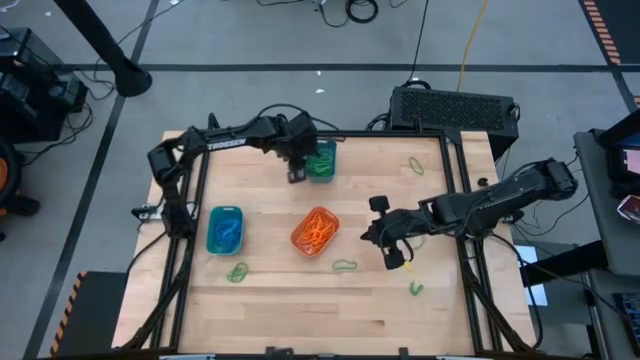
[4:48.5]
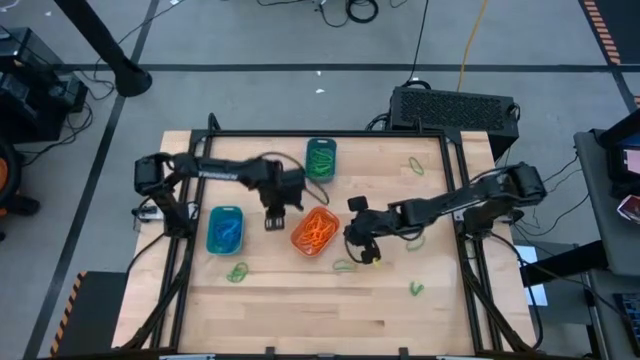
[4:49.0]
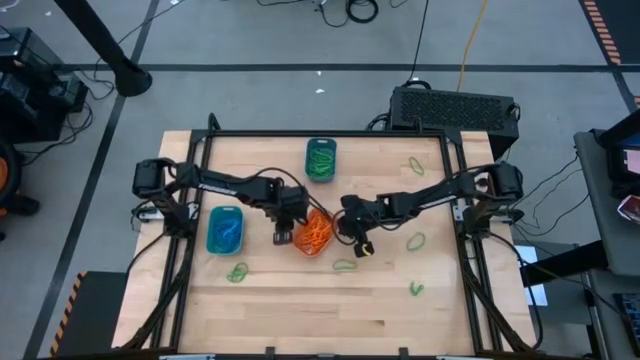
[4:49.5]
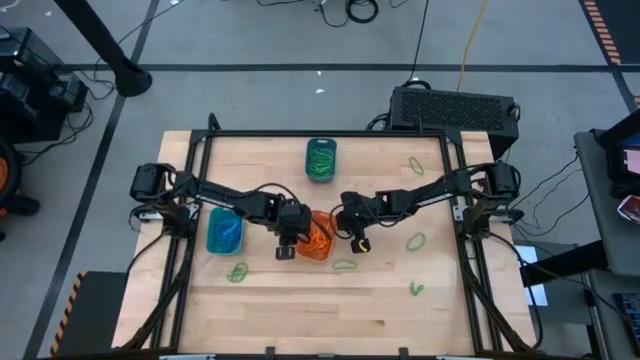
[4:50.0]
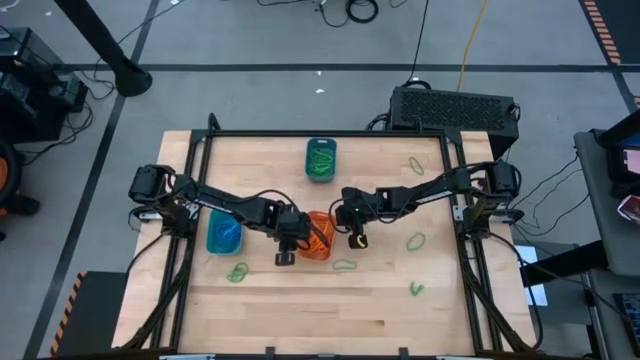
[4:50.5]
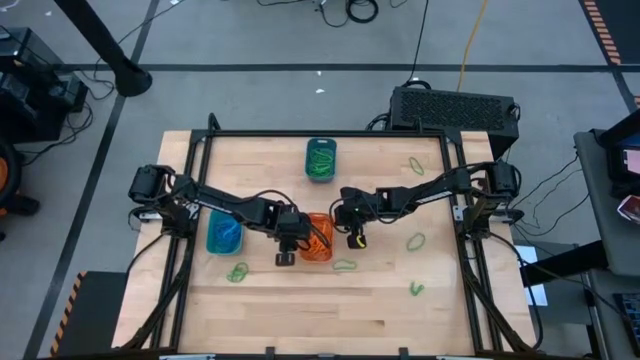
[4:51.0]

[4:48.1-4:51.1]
Task: Sort rubber bands into baskets
Adjust the orange bin on the table

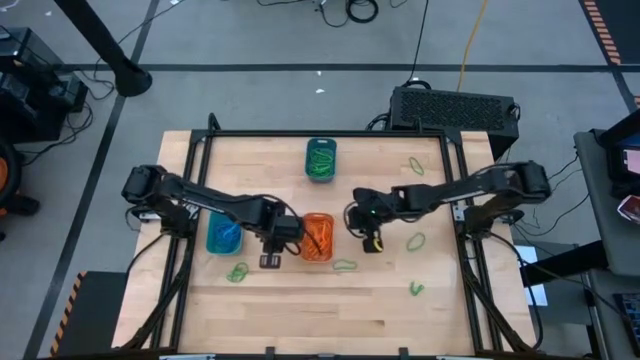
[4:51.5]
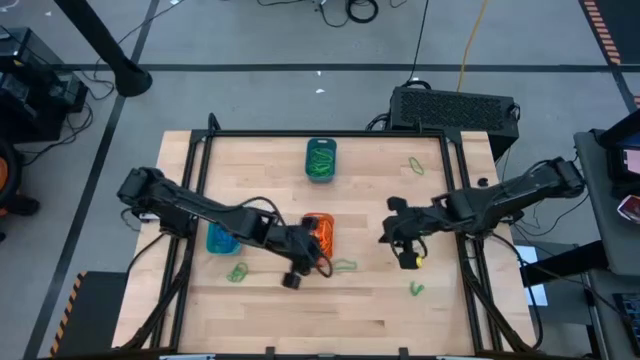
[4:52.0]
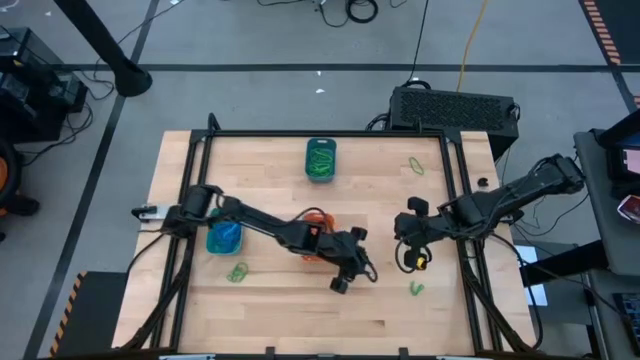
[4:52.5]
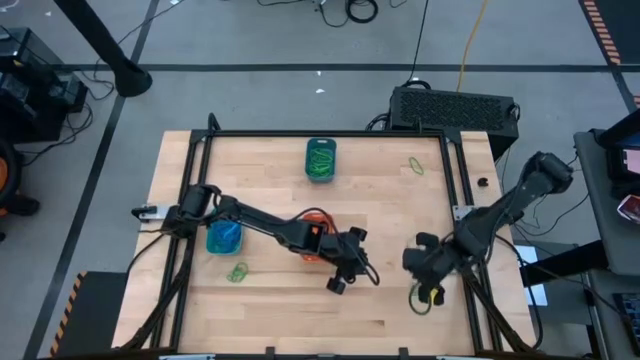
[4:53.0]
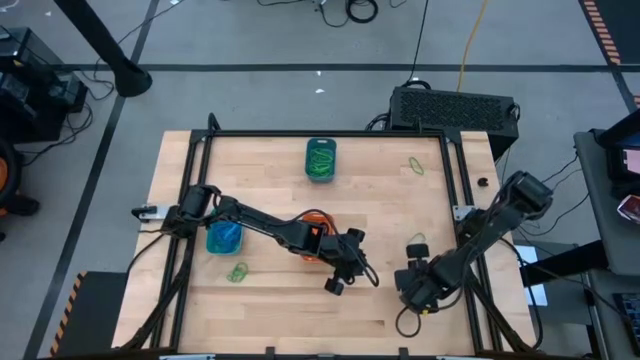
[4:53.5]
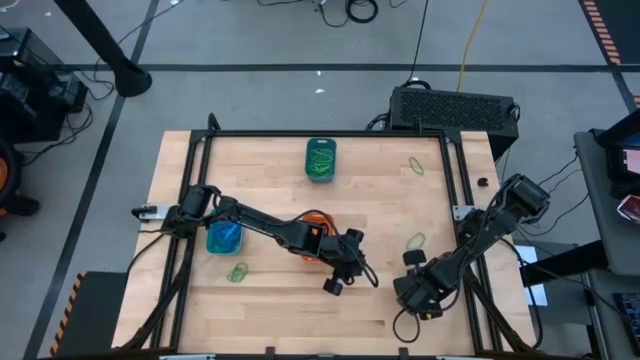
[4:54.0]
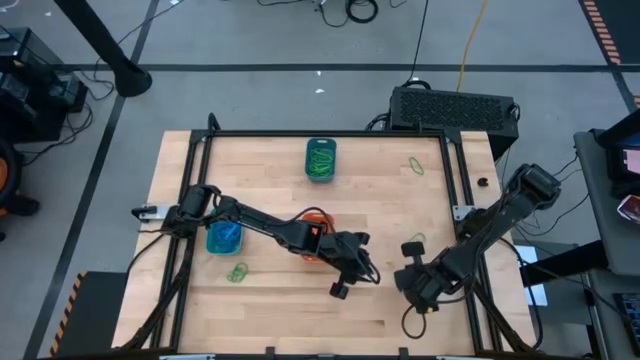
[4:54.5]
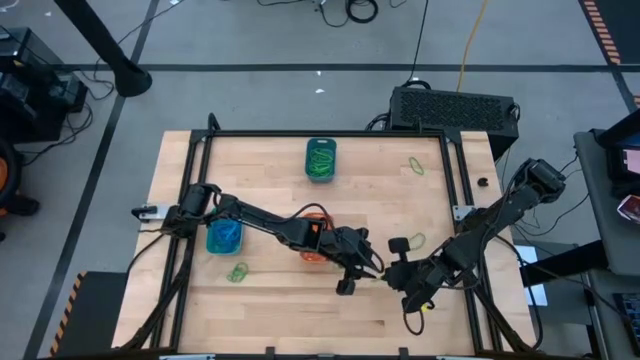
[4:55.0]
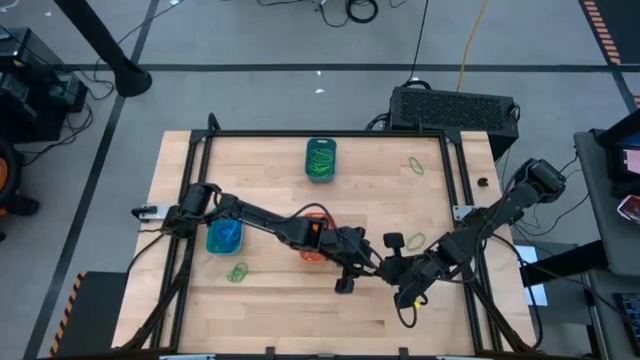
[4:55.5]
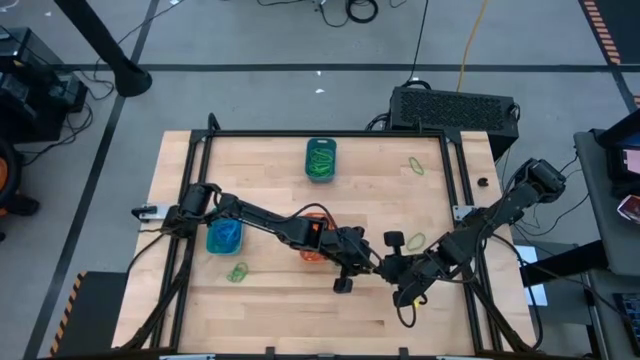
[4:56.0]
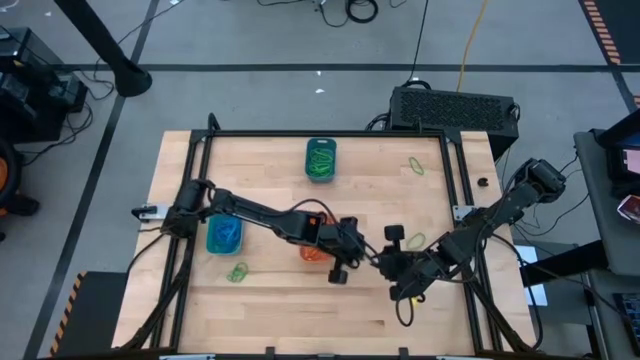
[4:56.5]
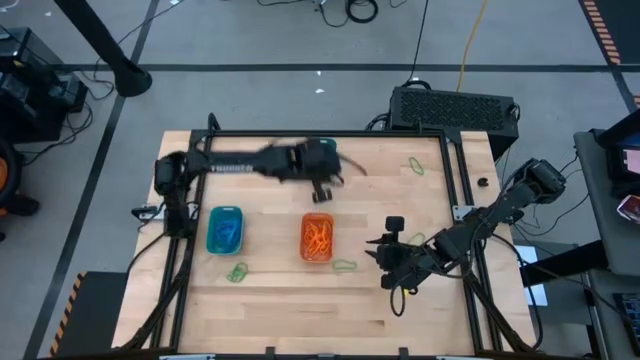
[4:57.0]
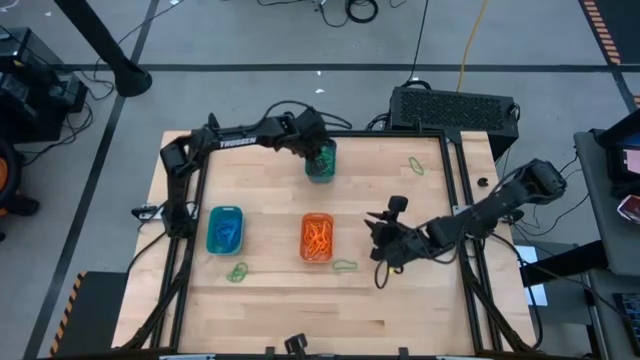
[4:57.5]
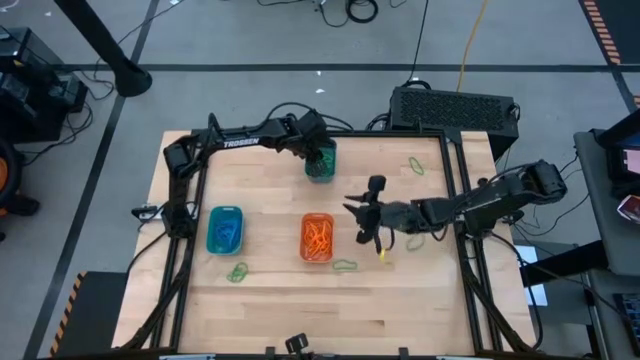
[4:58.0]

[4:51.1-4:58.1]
Put the green rubber band into the blue bin

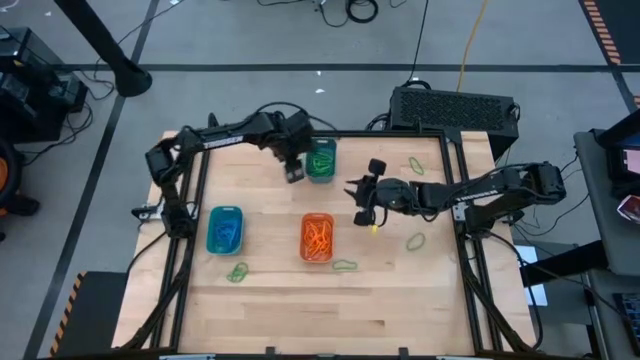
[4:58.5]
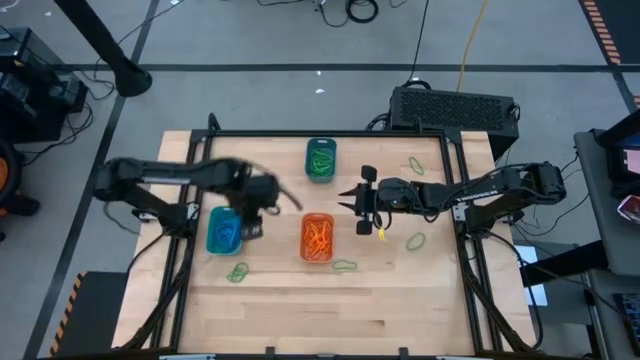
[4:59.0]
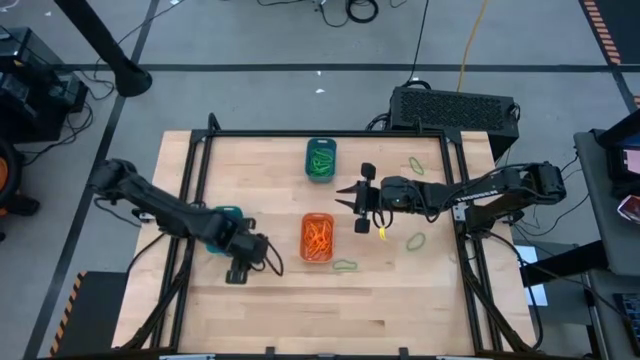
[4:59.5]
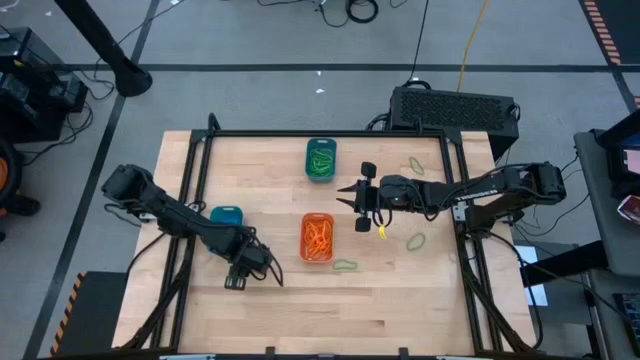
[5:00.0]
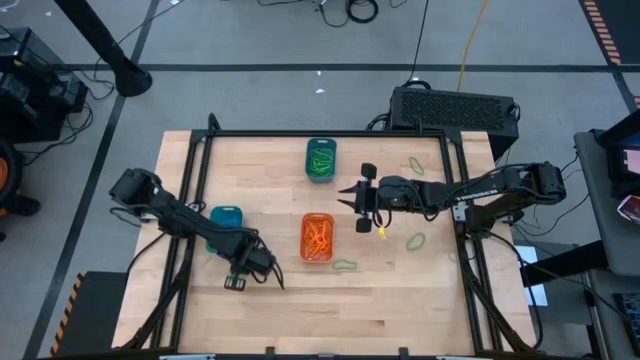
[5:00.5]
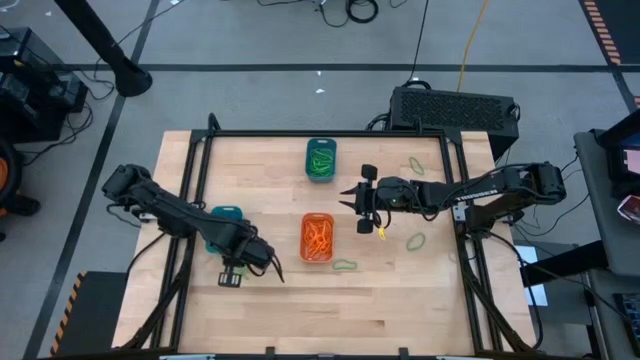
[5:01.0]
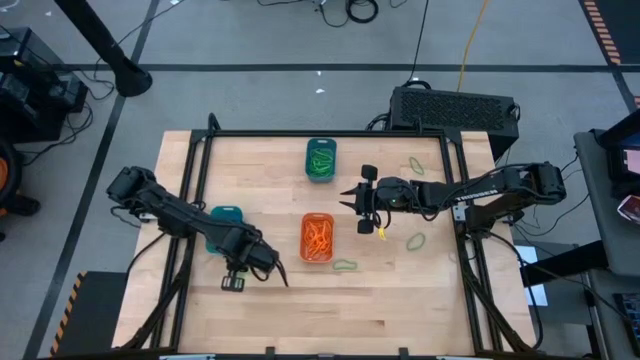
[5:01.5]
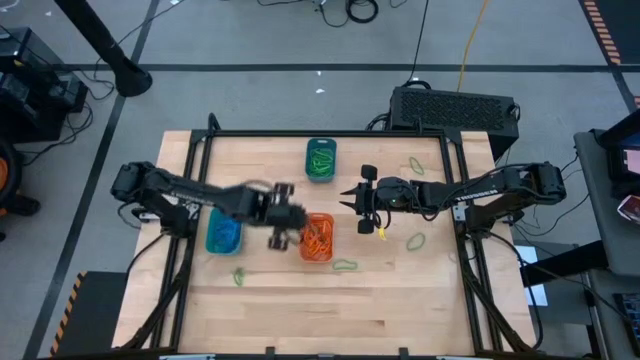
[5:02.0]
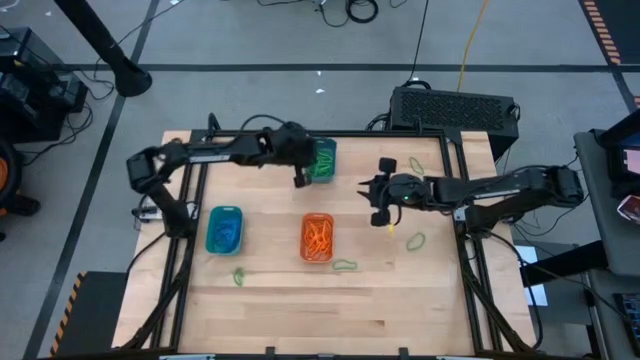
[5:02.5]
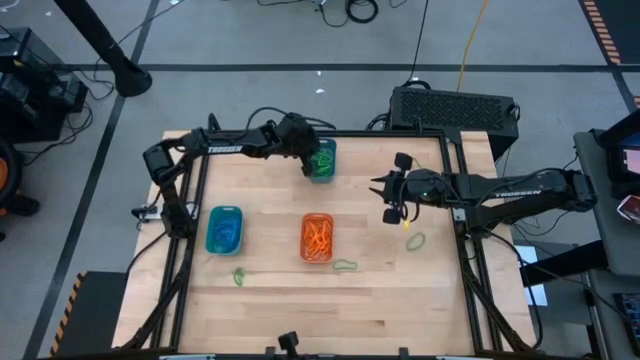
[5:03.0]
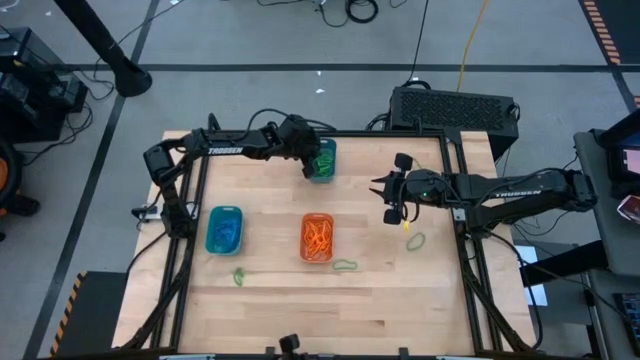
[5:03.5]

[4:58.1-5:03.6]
Put the green rubber band into the blue bin

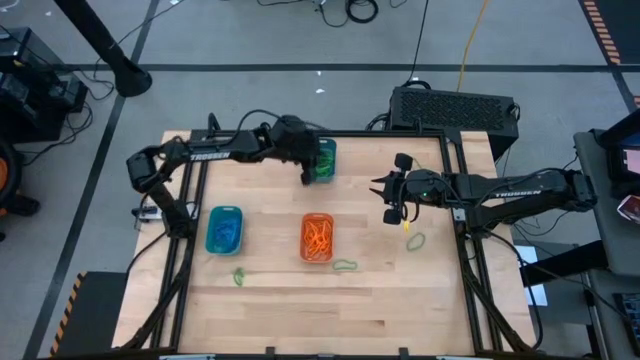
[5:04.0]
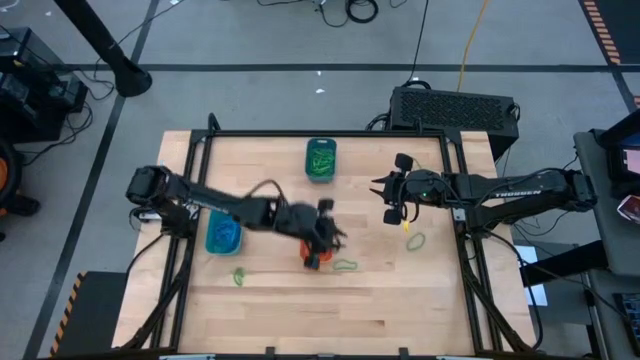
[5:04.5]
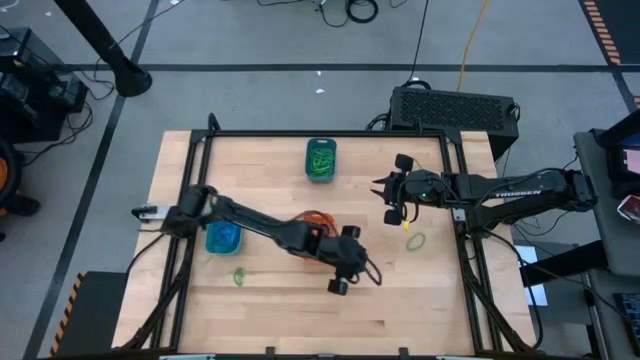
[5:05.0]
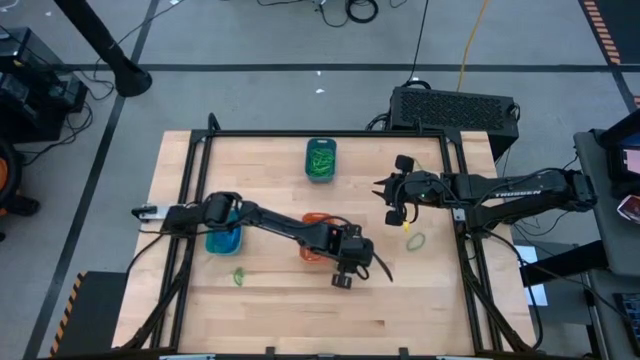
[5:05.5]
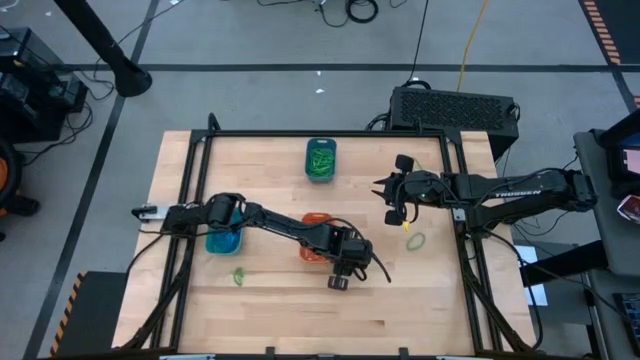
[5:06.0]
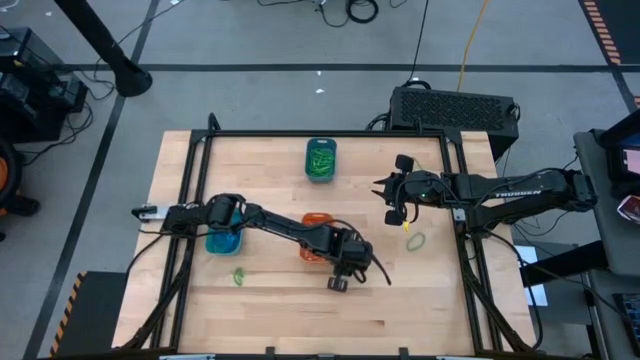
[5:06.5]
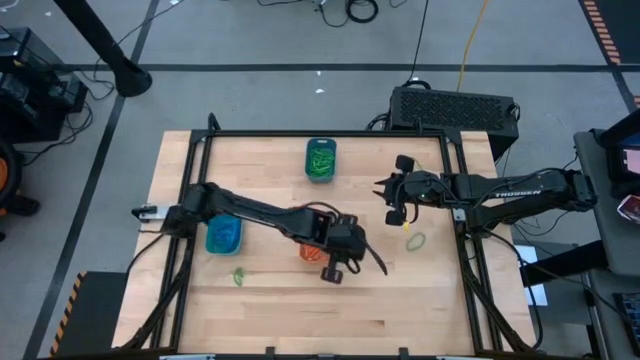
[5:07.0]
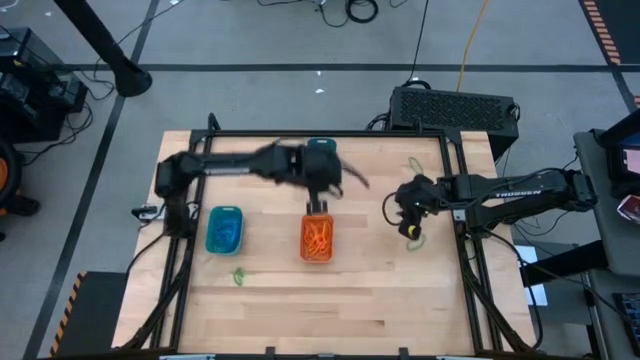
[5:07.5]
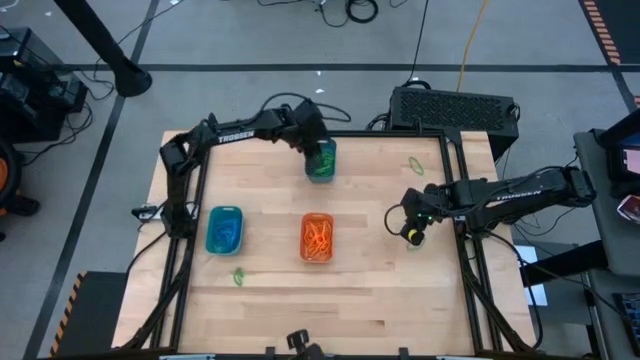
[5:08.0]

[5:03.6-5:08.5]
Put the green rubber band into the blue bin
